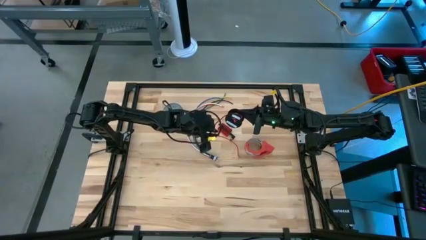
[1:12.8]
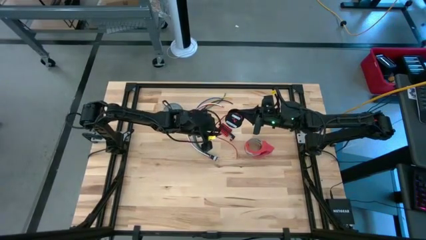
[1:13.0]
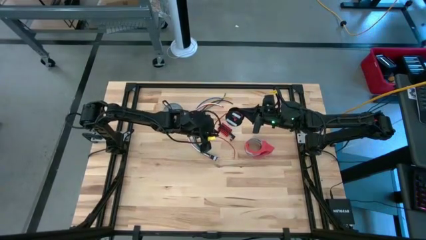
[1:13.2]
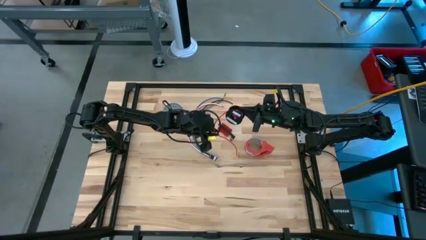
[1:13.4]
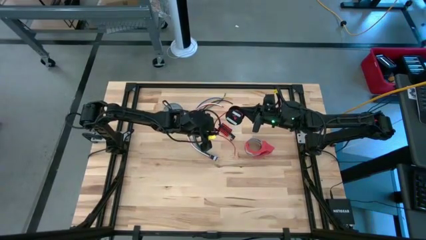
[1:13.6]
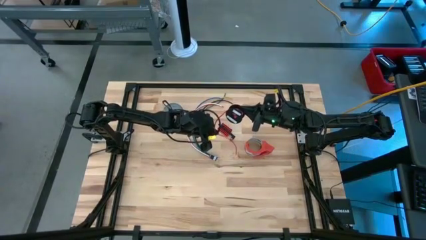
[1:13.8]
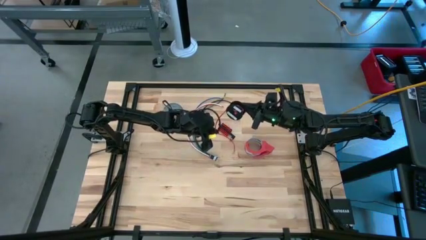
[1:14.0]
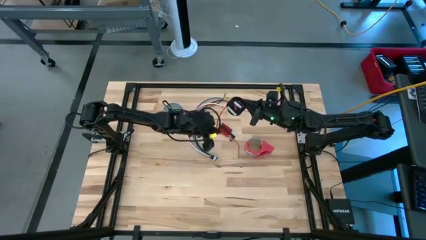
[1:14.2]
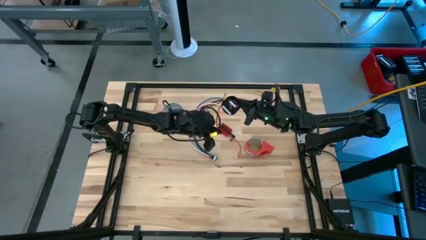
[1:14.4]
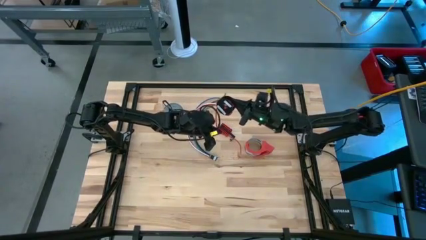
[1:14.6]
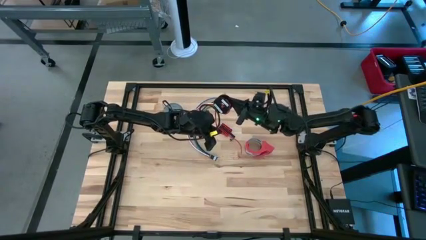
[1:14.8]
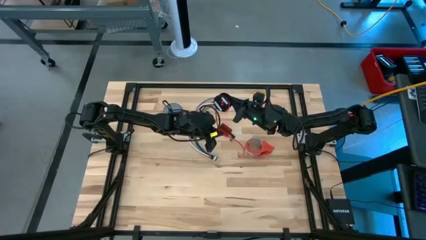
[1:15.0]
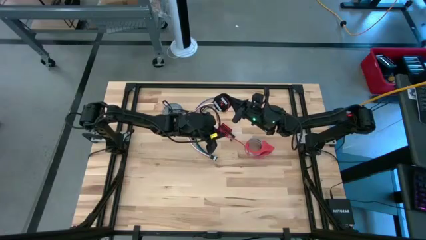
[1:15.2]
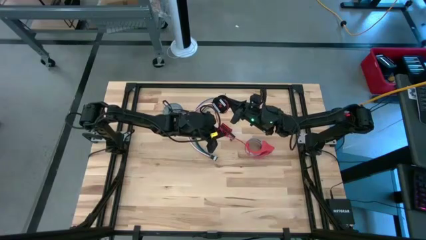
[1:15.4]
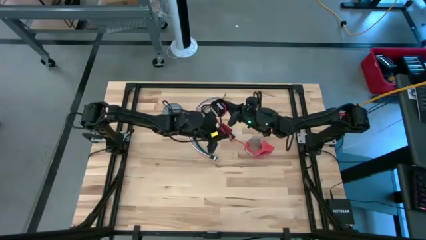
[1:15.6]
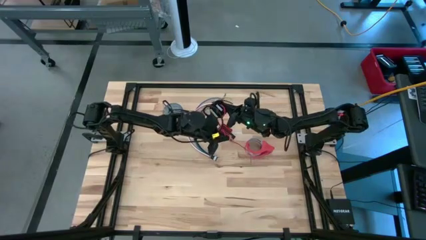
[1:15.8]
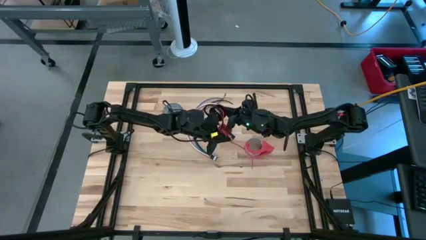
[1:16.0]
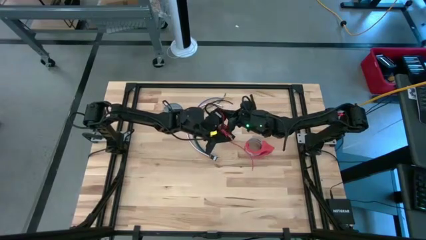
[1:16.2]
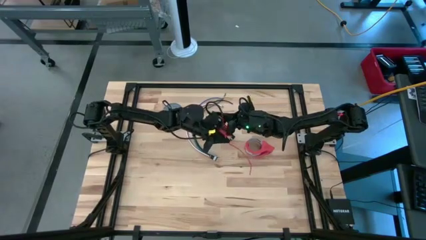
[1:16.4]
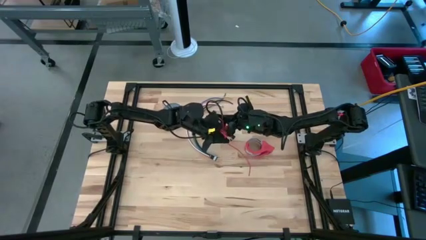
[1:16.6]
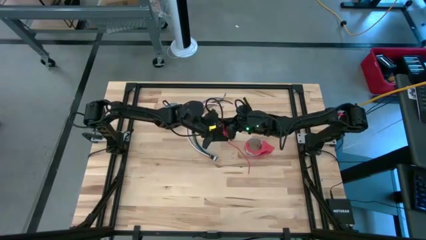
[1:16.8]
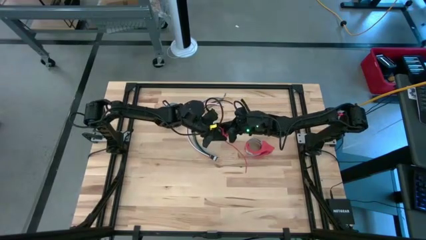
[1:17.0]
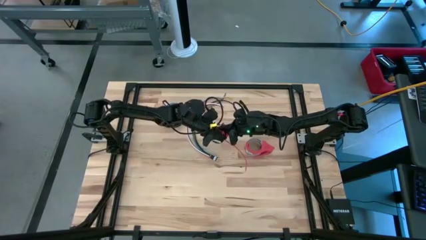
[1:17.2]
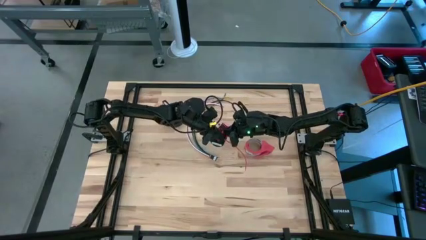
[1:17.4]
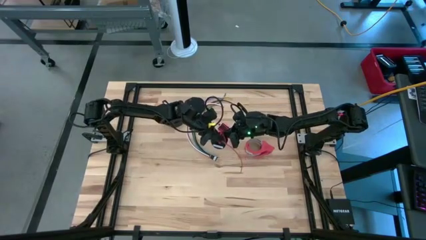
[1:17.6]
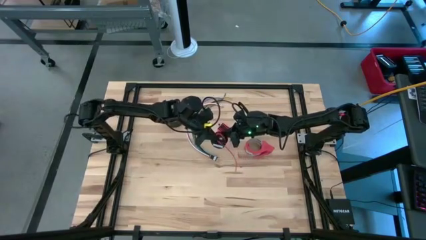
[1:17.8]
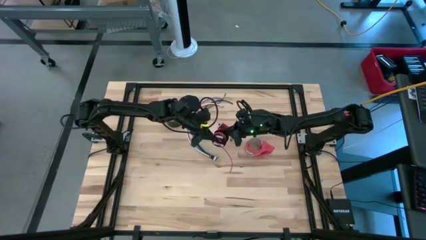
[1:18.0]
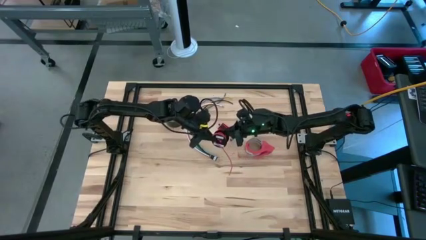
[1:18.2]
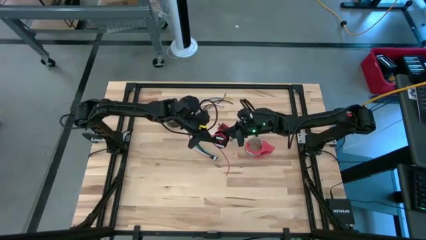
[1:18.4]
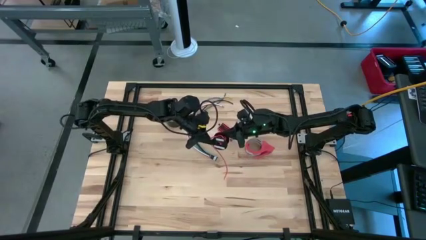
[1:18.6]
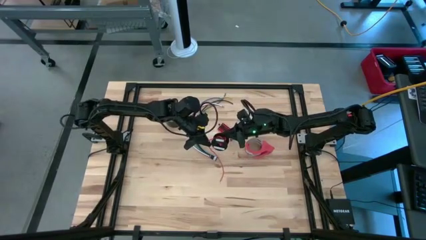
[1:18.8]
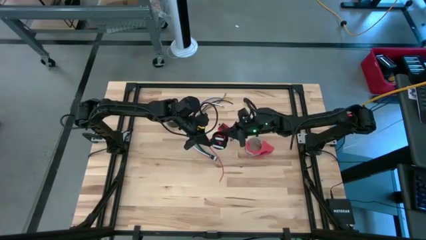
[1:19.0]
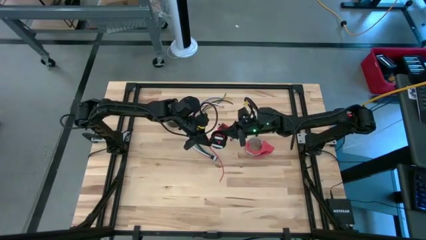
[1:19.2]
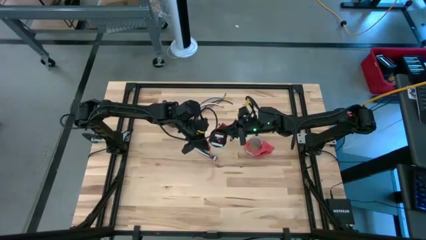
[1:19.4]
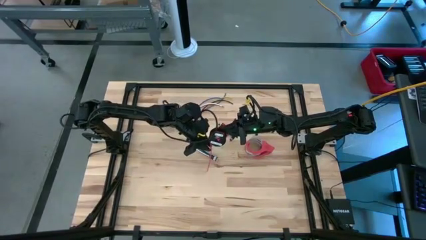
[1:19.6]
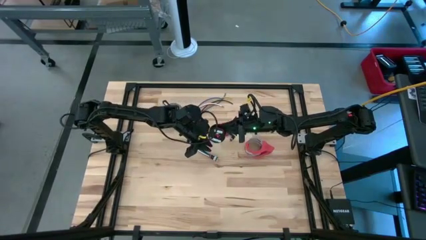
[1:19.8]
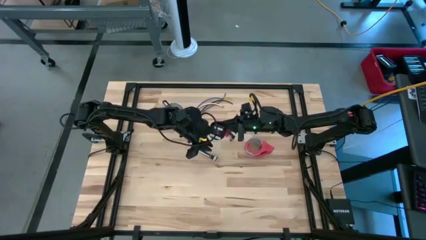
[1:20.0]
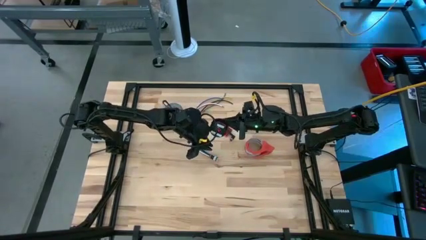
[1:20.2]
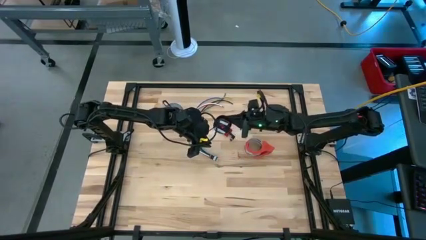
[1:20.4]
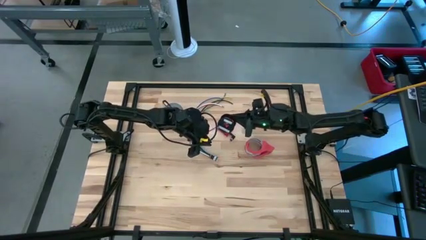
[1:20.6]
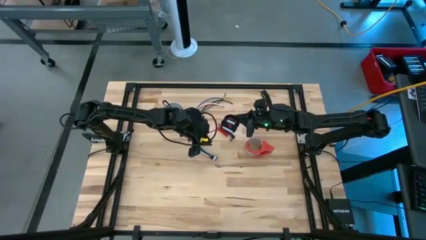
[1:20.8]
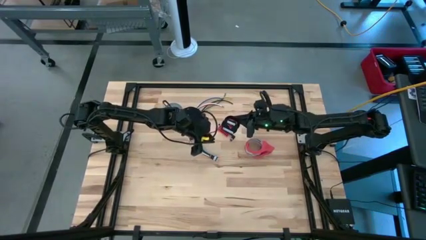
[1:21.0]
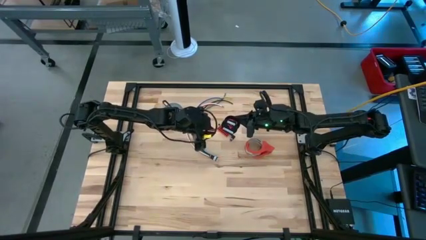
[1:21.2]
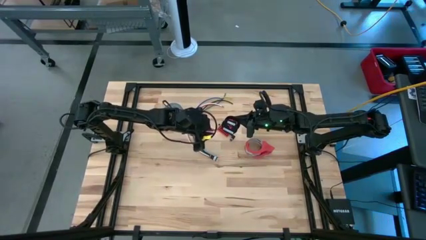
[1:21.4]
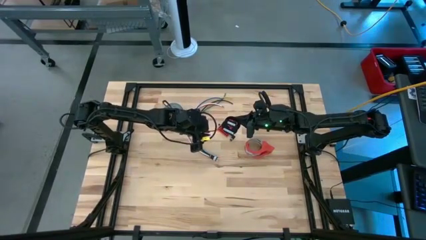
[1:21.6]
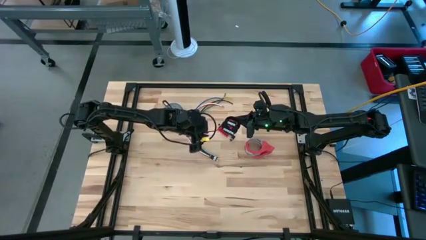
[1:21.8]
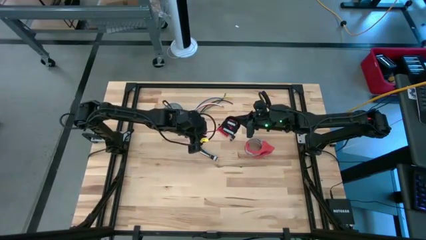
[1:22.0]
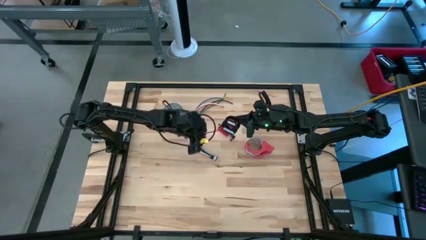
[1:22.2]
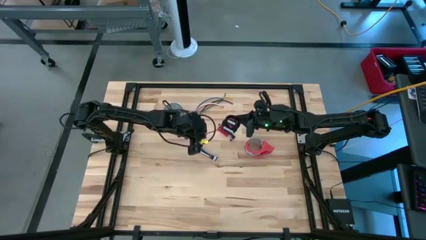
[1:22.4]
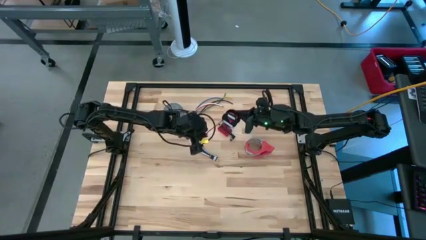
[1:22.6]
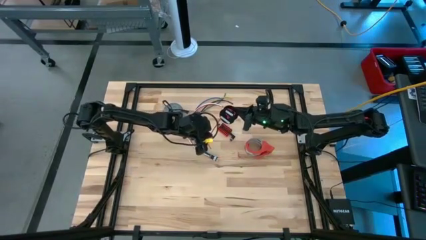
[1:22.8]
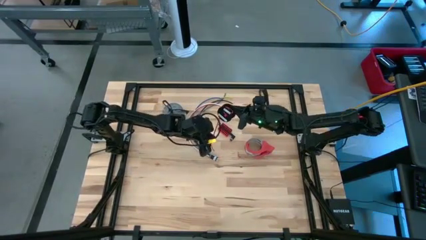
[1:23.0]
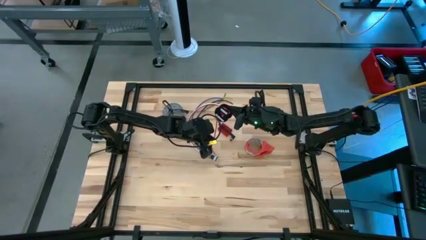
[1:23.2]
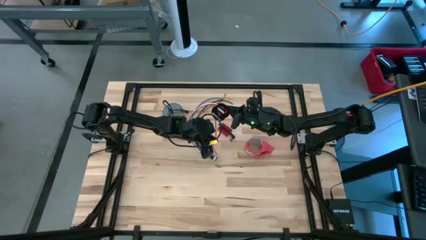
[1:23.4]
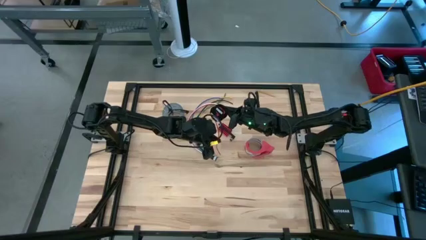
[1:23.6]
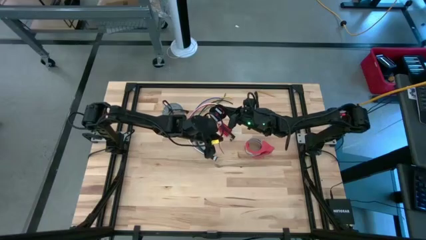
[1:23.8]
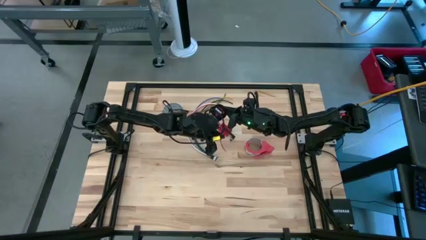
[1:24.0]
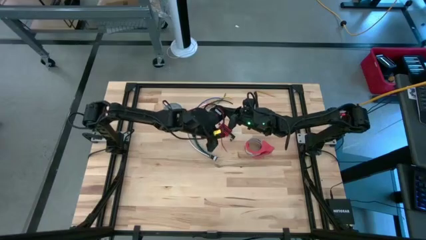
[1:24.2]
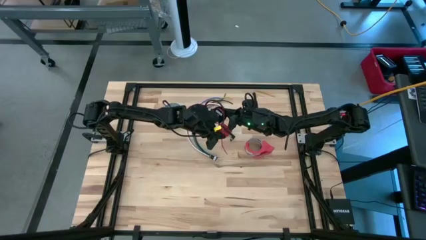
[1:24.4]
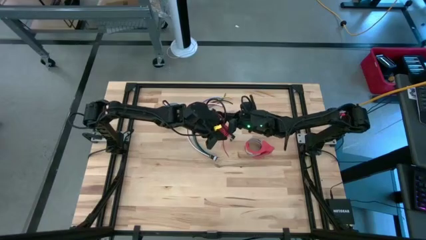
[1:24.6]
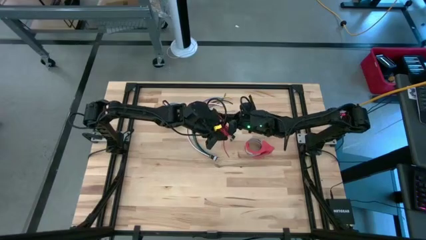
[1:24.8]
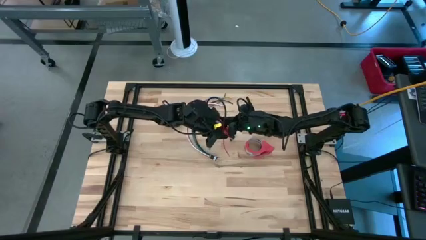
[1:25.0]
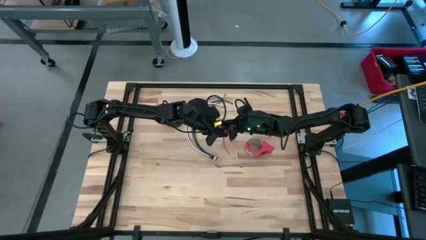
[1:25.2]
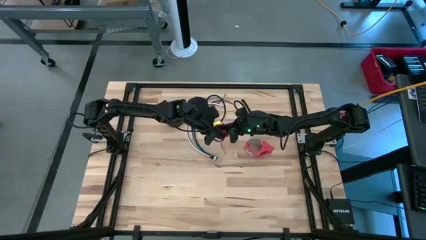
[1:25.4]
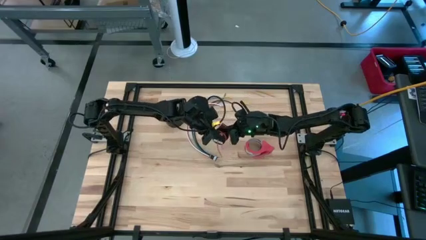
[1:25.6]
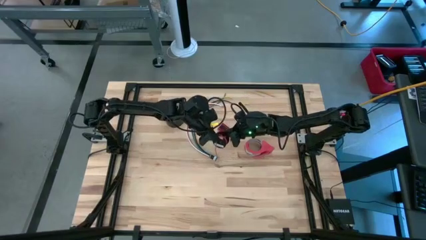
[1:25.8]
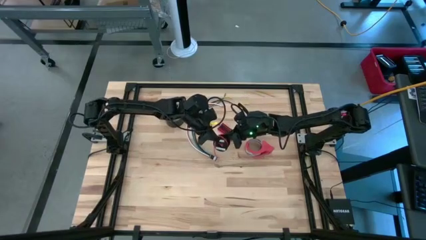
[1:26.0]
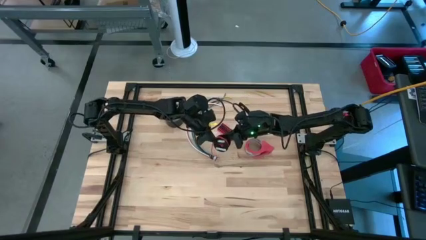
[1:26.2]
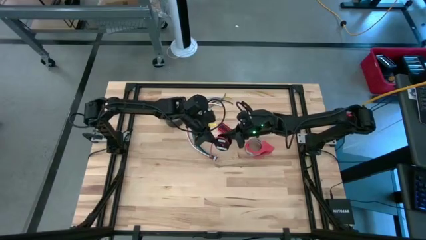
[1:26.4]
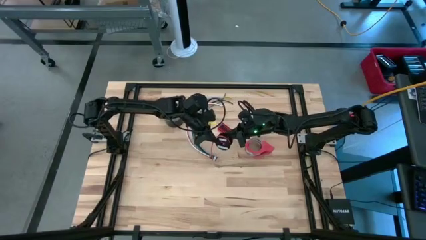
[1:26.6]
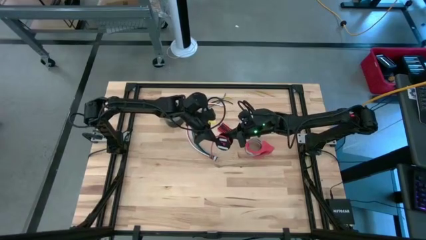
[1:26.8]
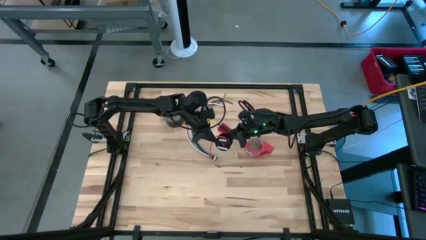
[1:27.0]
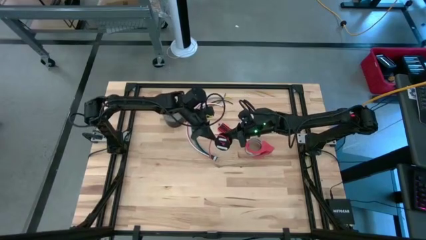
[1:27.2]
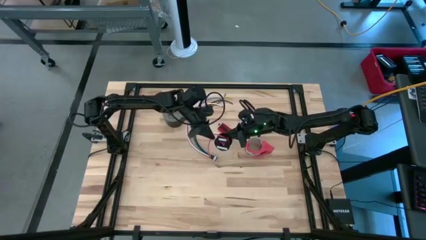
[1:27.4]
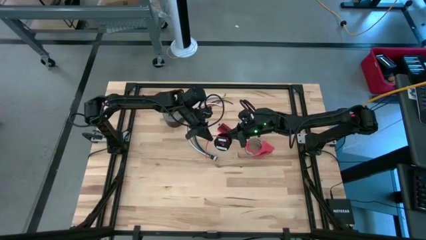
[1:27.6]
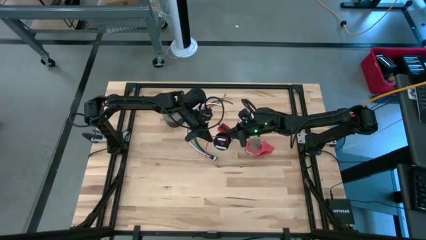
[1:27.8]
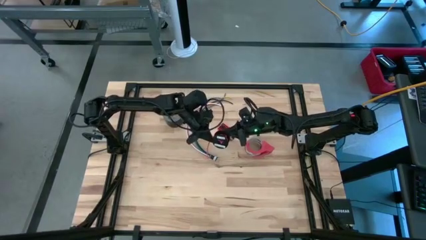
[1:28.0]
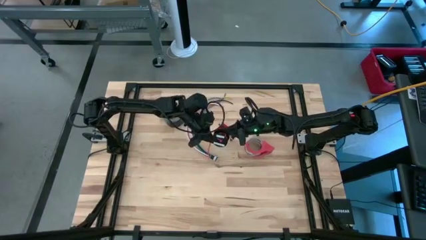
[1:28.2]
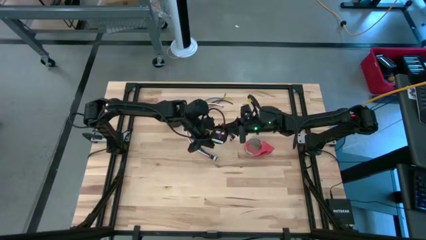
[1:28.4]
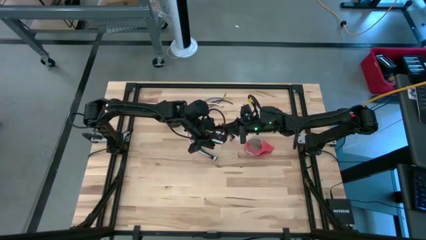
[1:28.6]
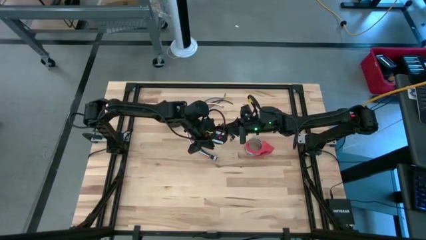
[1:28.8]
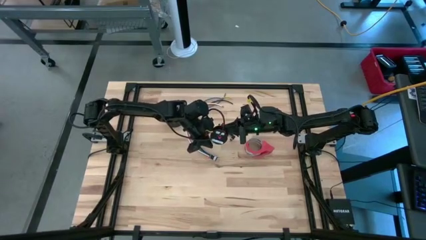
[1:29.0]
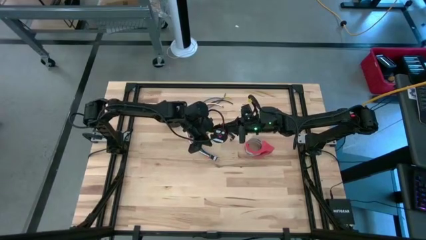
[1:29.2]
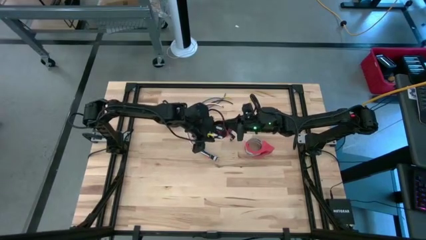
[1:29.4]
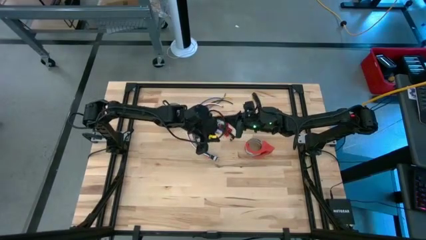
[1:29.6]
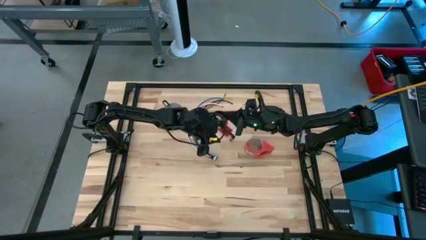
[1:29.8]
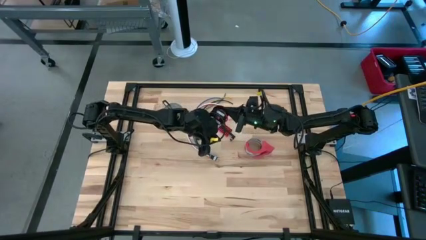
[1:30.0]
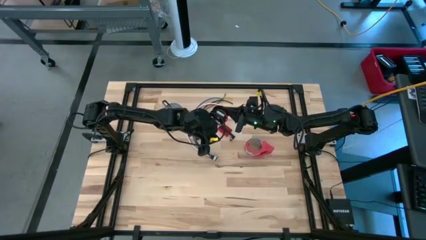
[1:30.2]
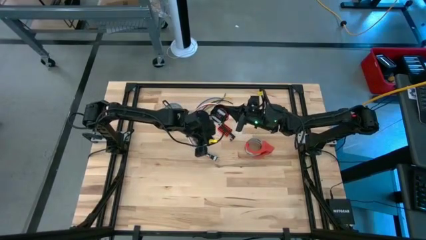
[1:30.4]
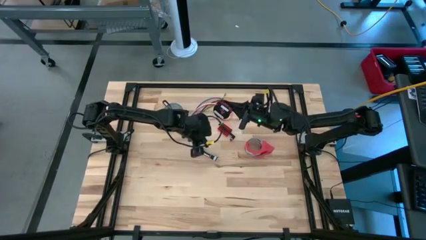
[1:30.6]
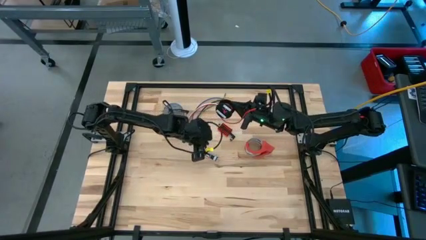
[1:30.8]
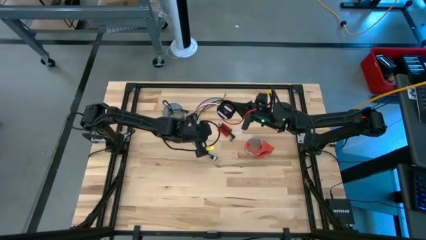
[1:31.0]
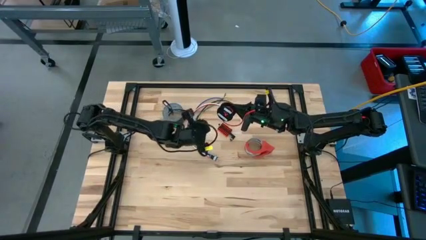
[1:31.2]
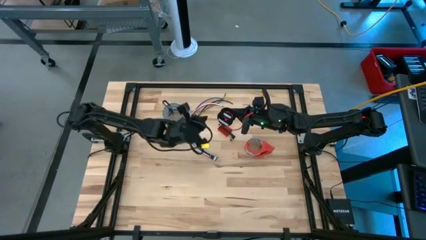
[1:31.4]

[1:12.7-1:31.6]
Task: Coil cords
Coil the red wire onto the spool
